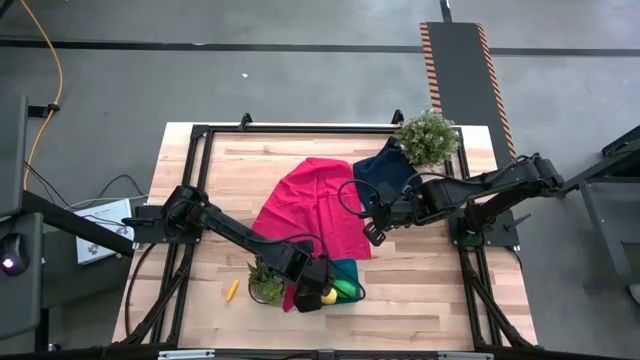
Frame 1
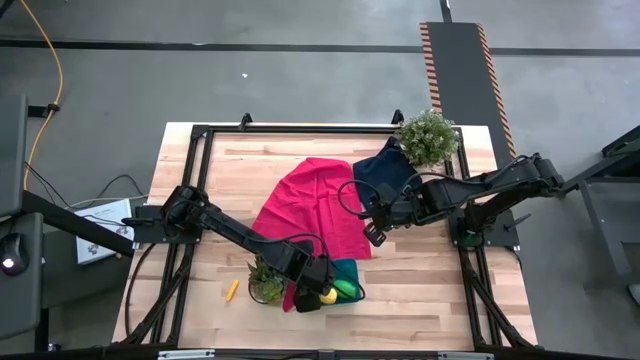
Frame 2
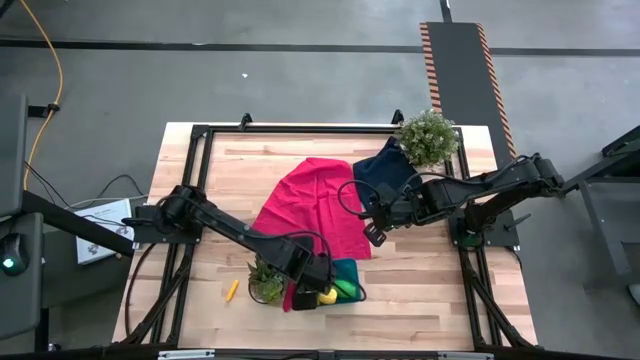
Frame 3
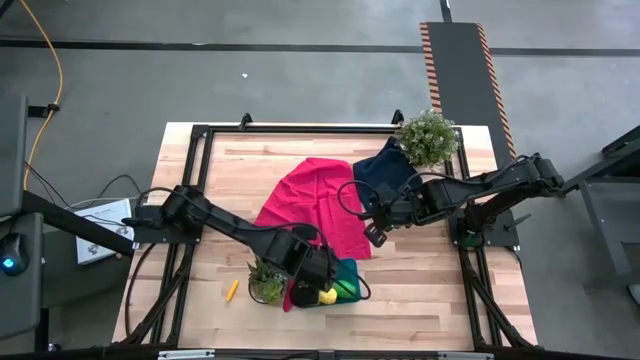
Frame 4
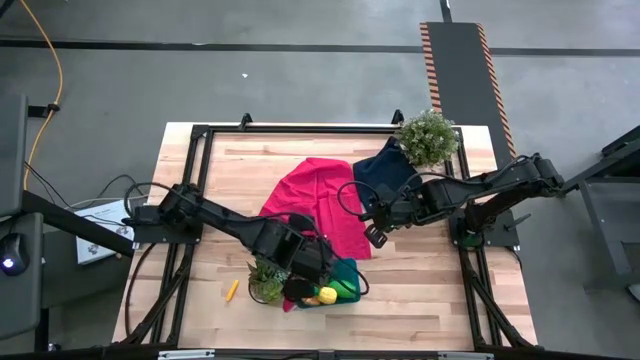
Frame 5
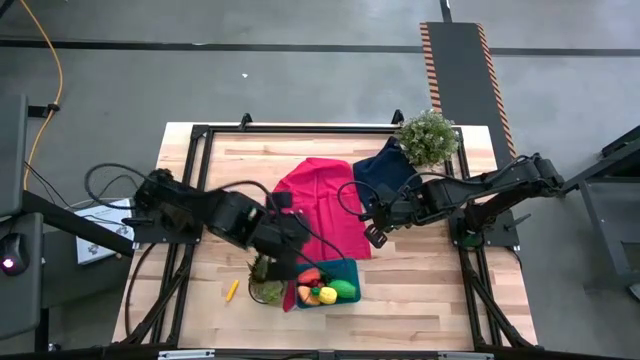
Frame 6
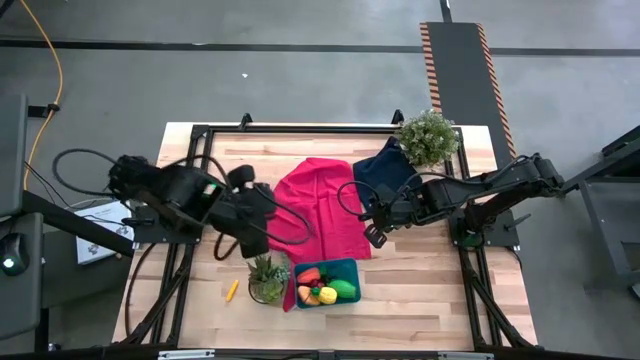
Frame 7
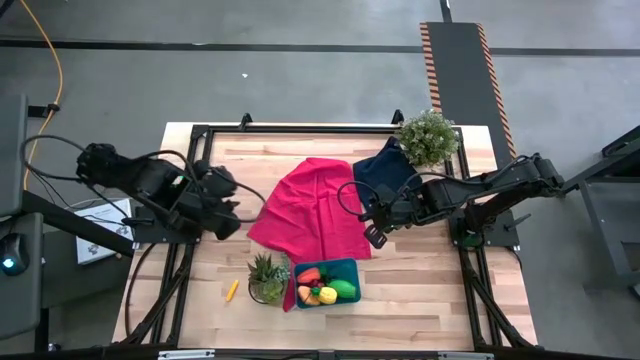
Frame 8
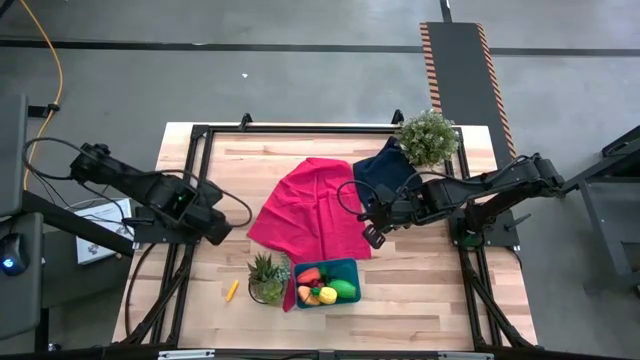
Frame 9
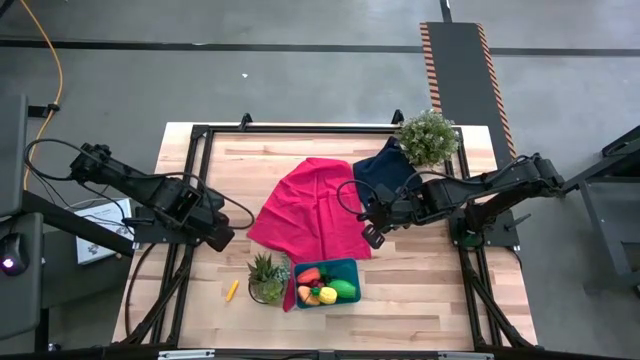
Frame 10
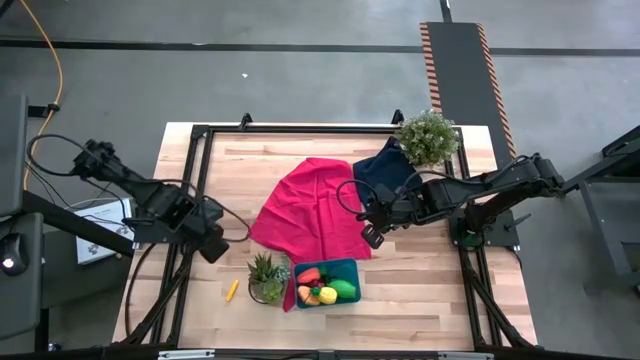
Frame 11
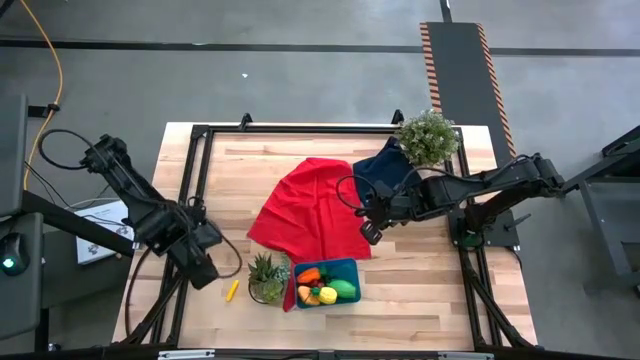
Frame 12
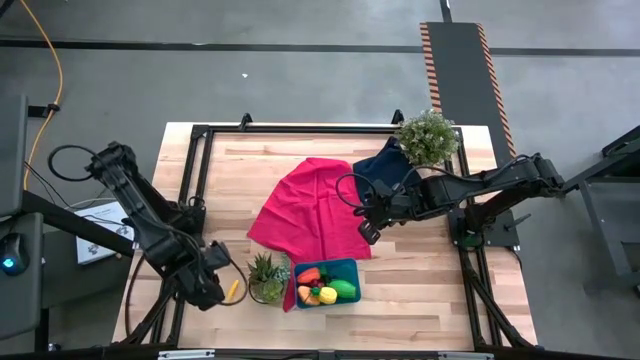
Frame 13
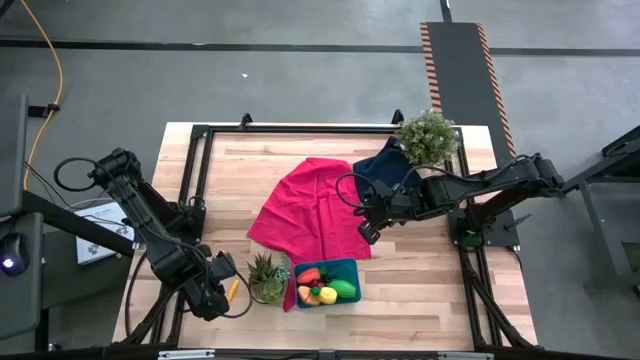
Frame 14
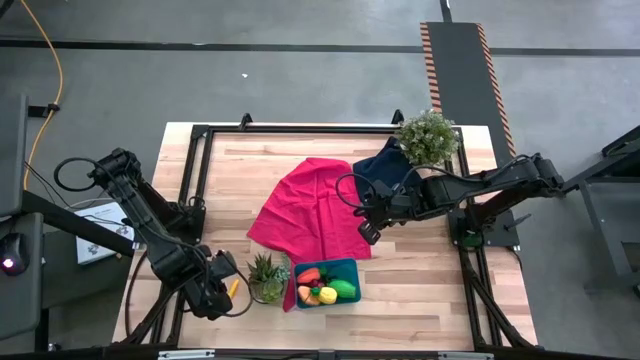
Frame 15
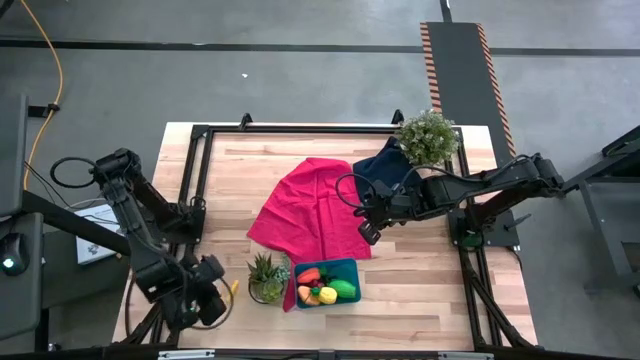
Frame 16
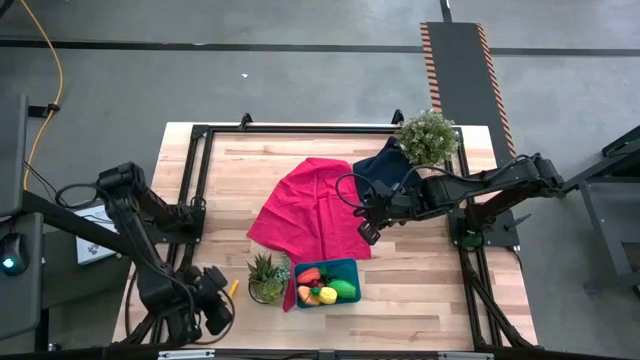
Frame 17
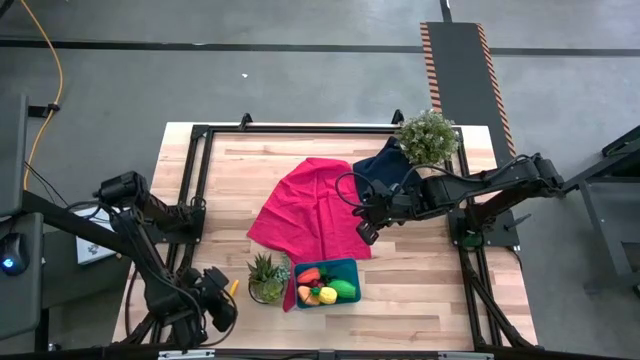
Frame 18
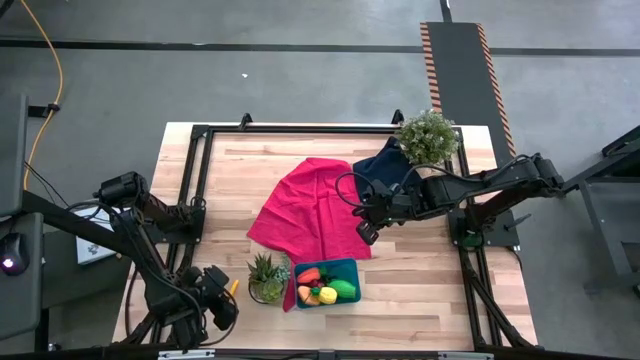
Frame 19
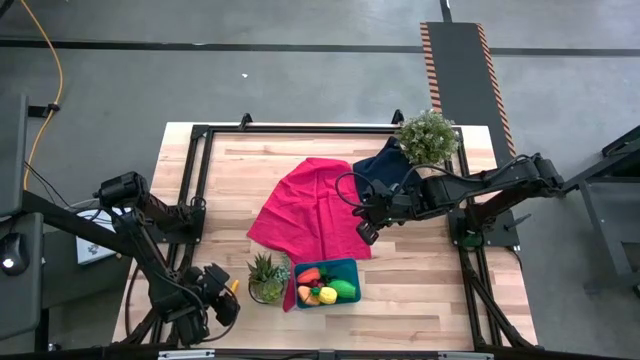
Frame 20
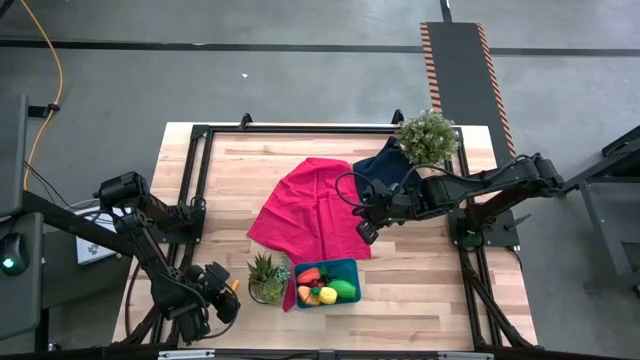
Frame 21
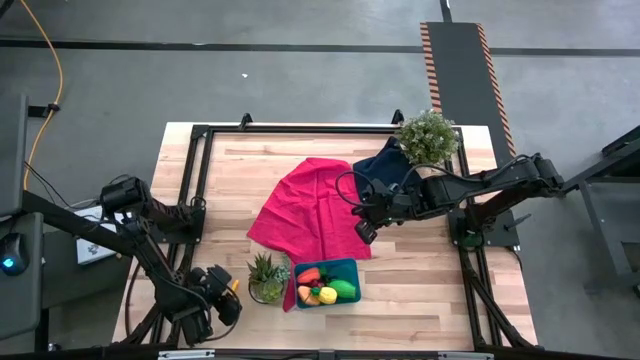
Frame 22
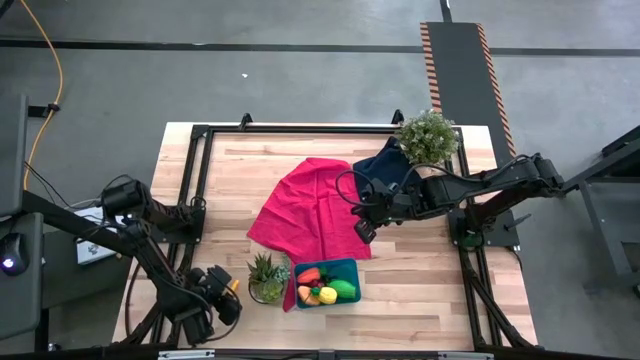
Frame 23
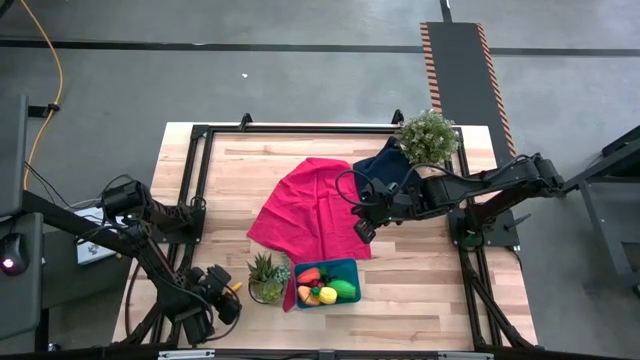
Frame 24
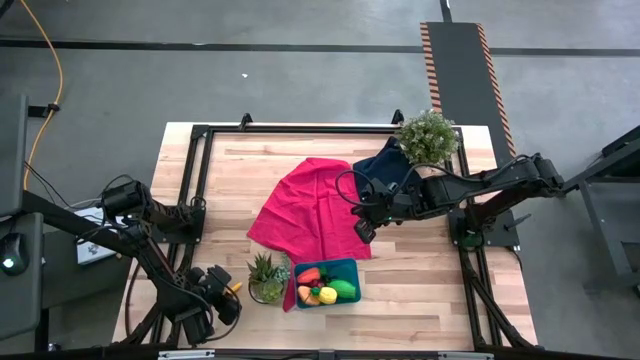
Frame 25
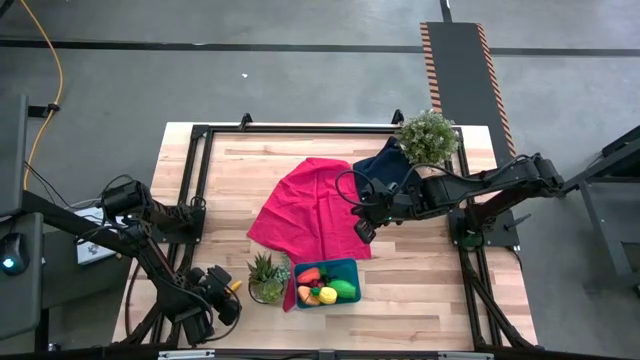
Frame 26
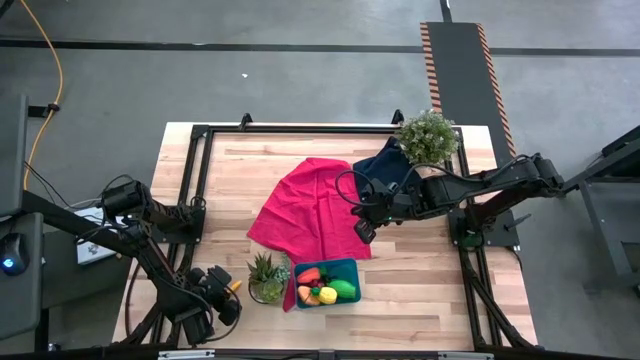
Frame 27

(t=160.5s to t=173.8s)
Task: Pick and placing Produce into tupperware
Put the yellow corn into the blue bin
